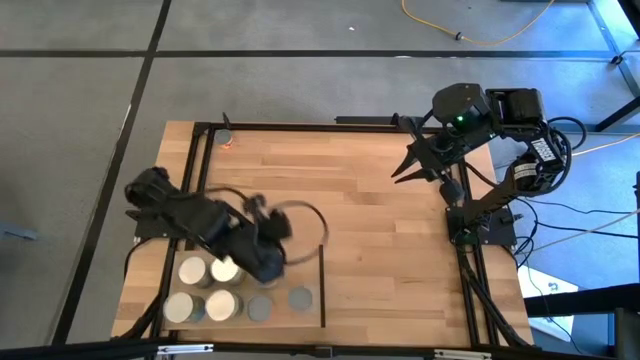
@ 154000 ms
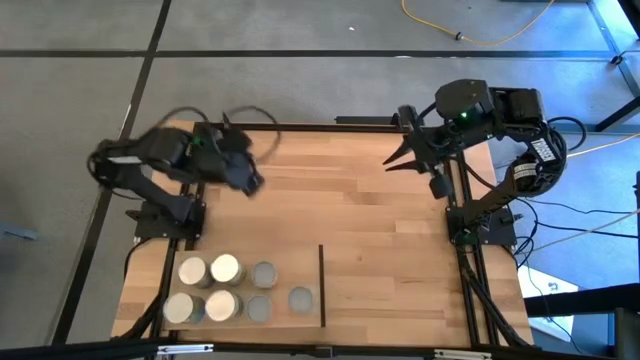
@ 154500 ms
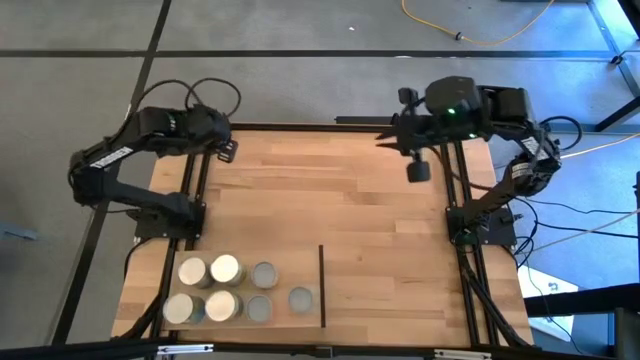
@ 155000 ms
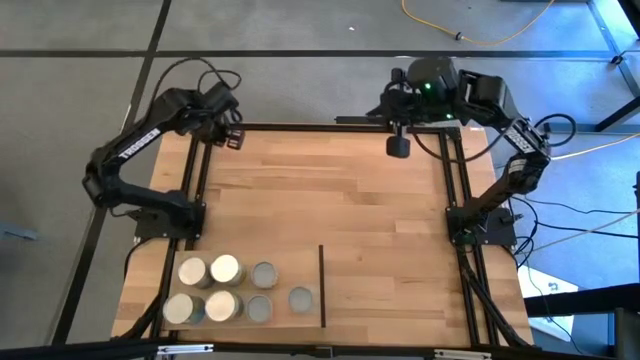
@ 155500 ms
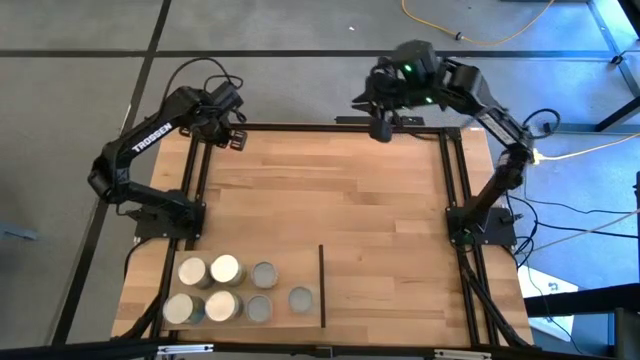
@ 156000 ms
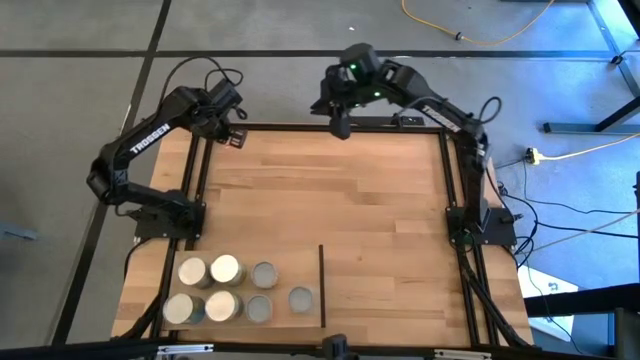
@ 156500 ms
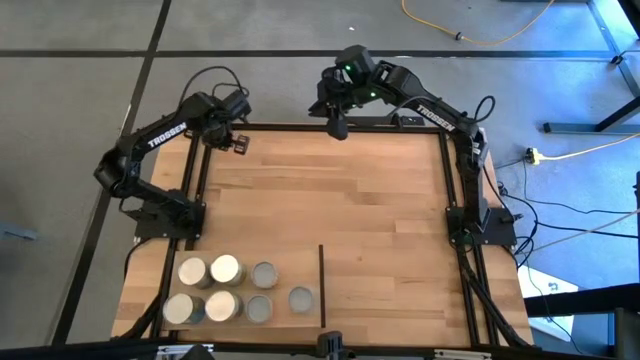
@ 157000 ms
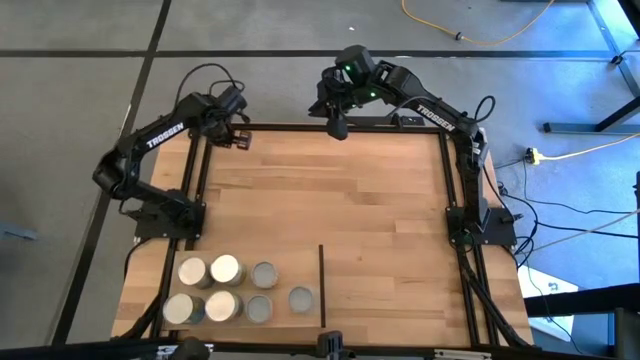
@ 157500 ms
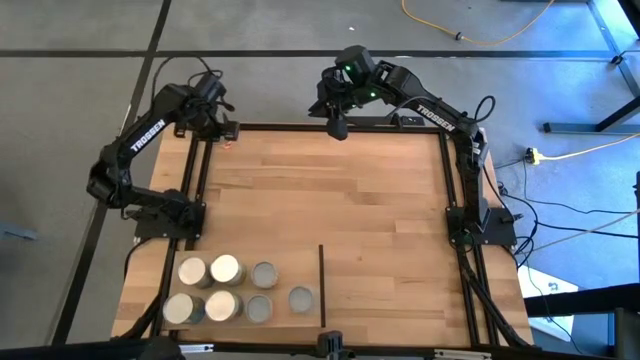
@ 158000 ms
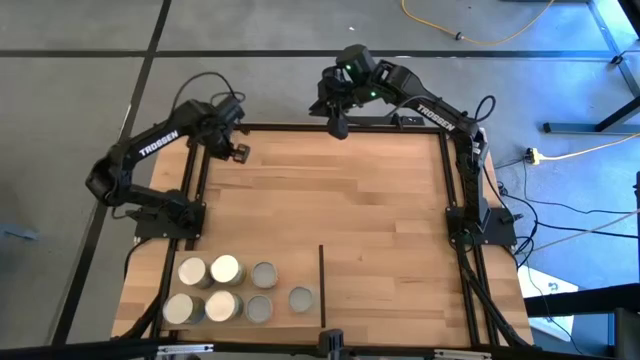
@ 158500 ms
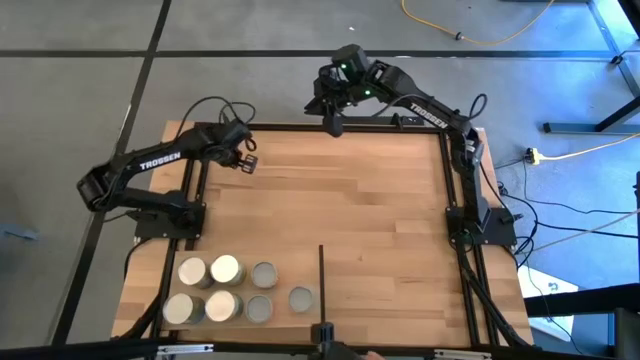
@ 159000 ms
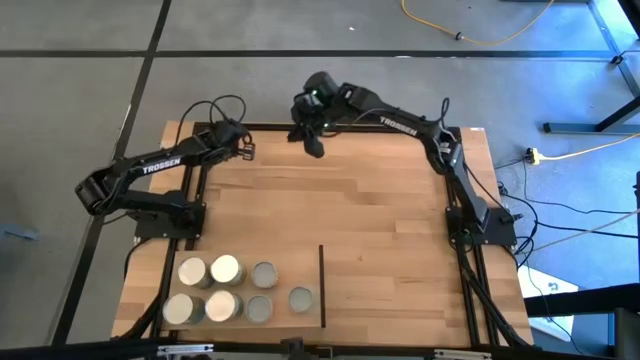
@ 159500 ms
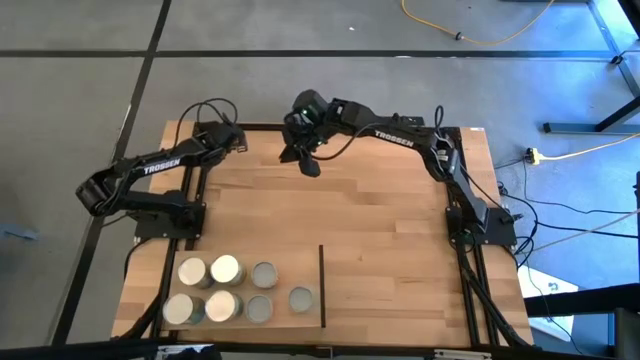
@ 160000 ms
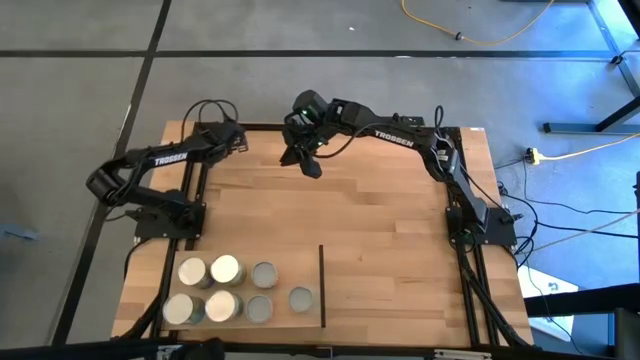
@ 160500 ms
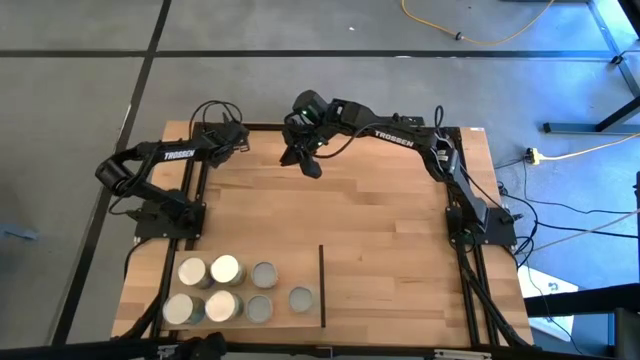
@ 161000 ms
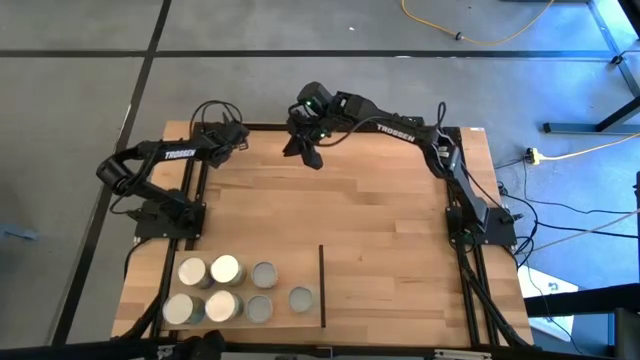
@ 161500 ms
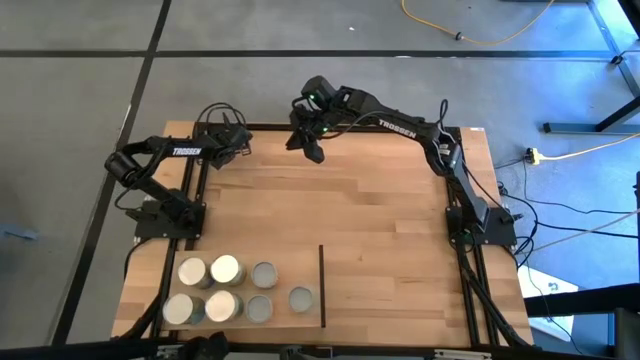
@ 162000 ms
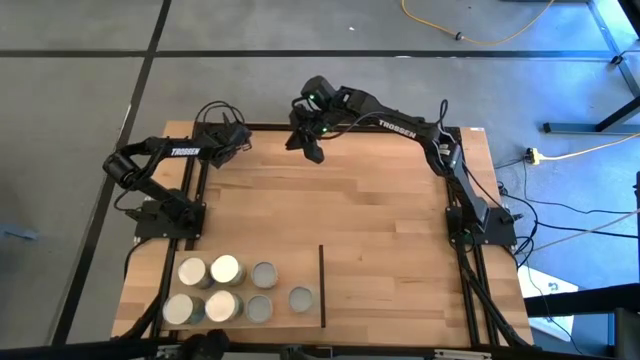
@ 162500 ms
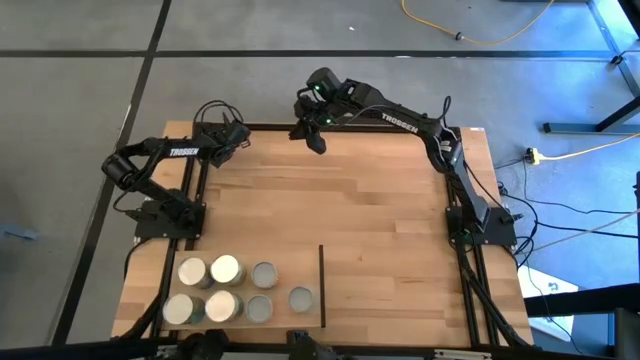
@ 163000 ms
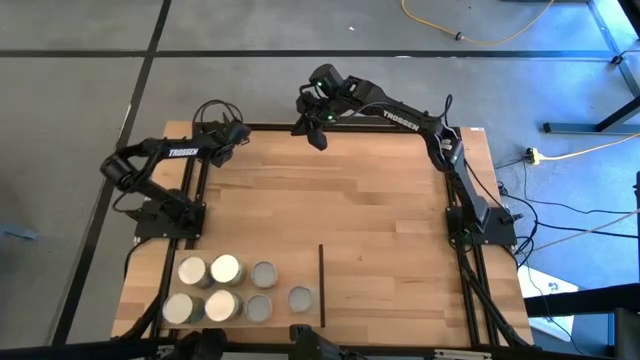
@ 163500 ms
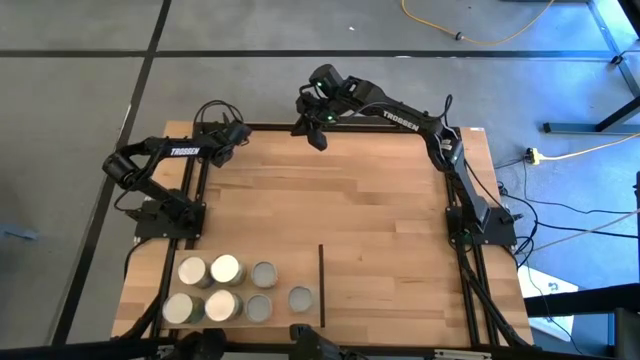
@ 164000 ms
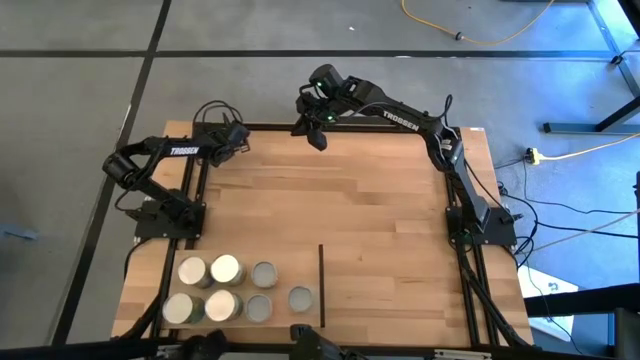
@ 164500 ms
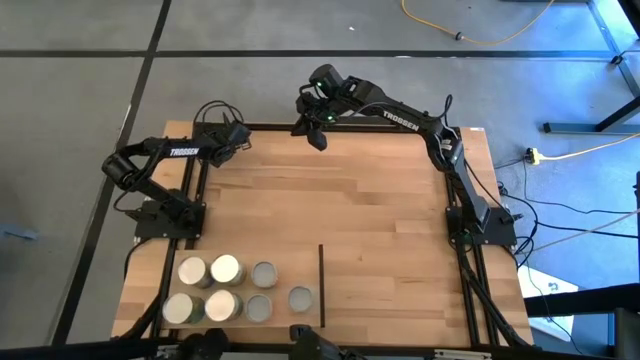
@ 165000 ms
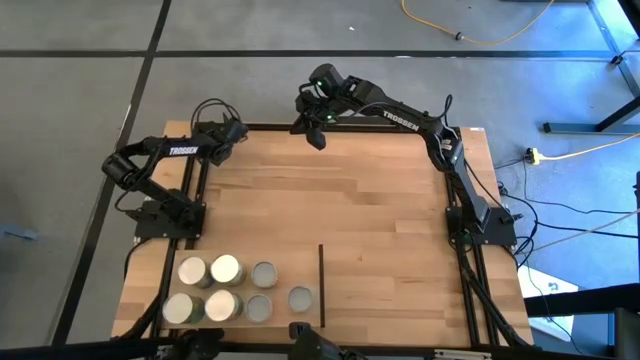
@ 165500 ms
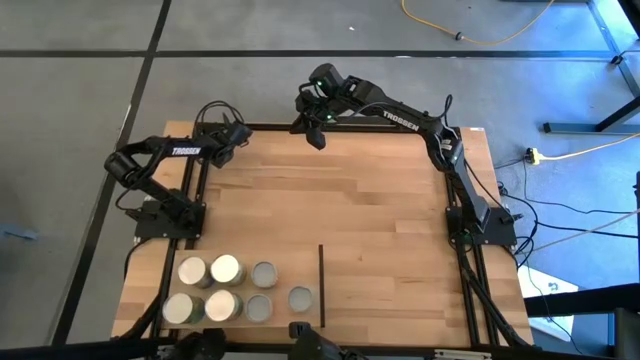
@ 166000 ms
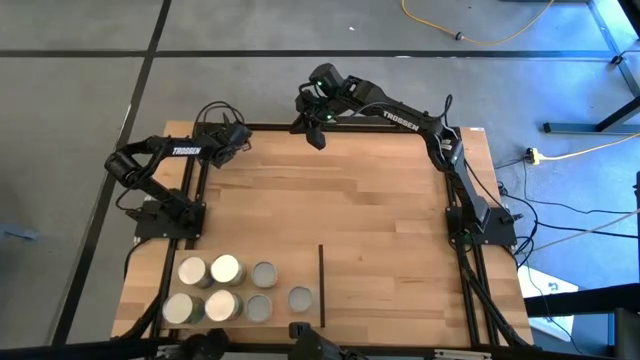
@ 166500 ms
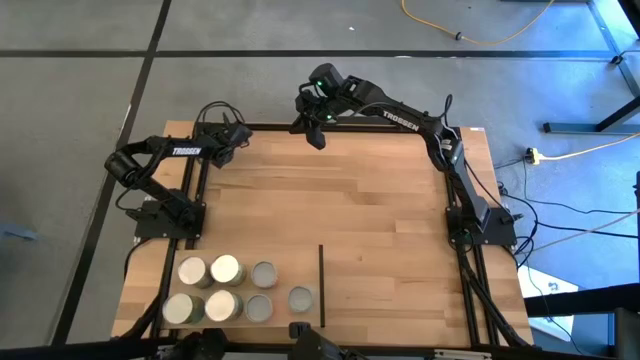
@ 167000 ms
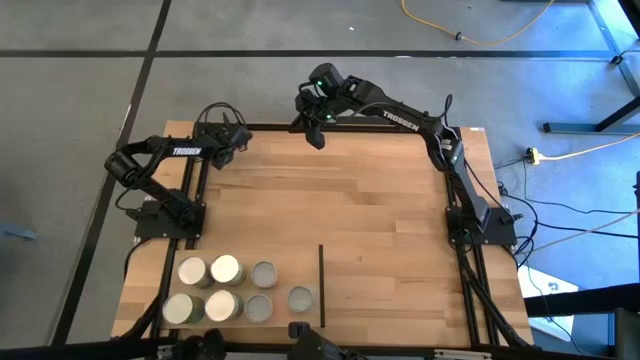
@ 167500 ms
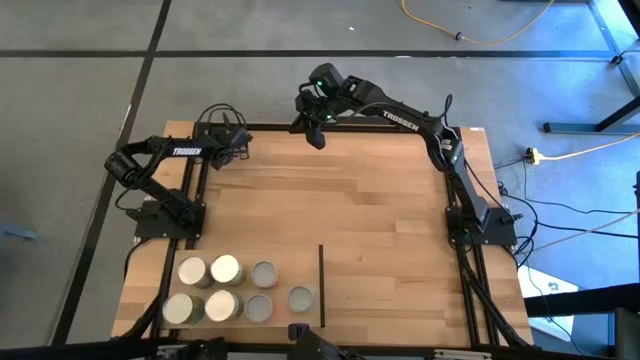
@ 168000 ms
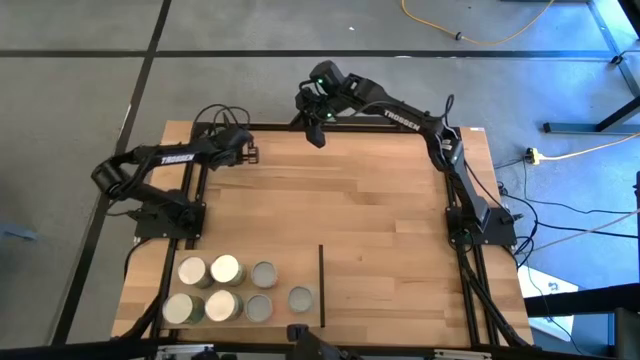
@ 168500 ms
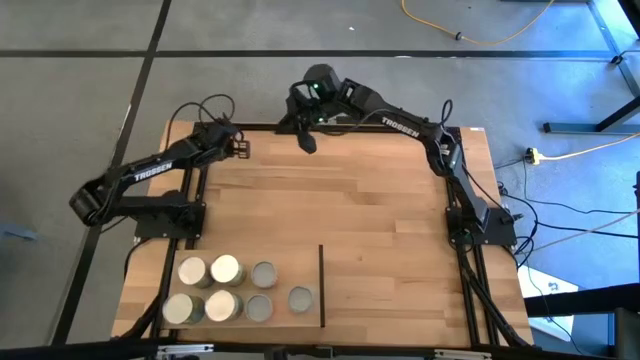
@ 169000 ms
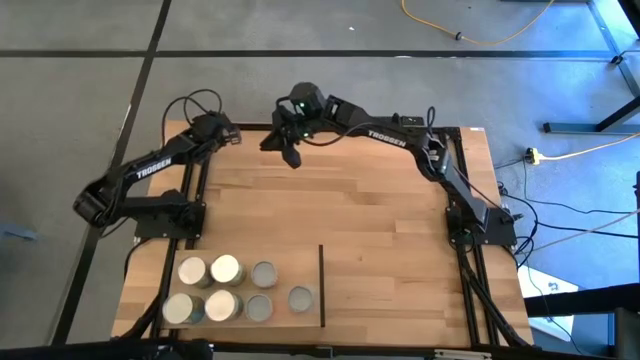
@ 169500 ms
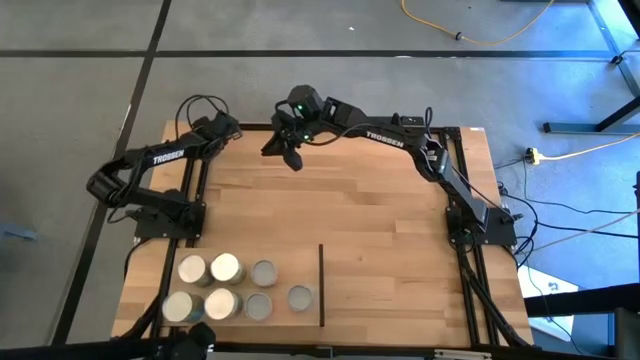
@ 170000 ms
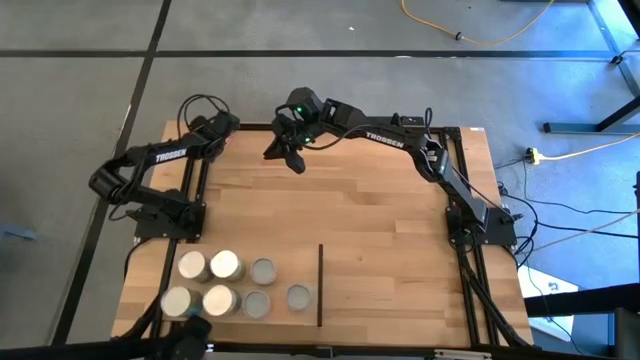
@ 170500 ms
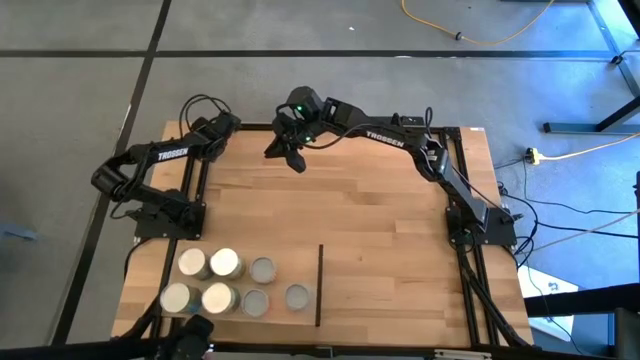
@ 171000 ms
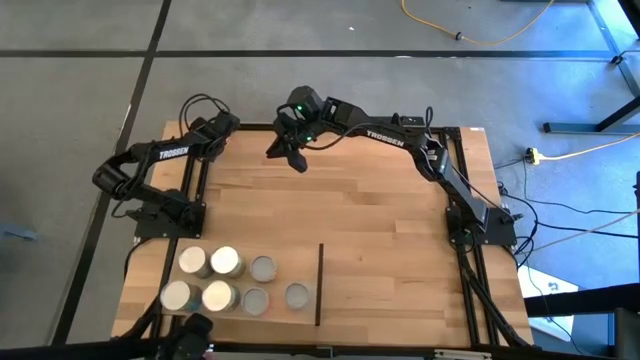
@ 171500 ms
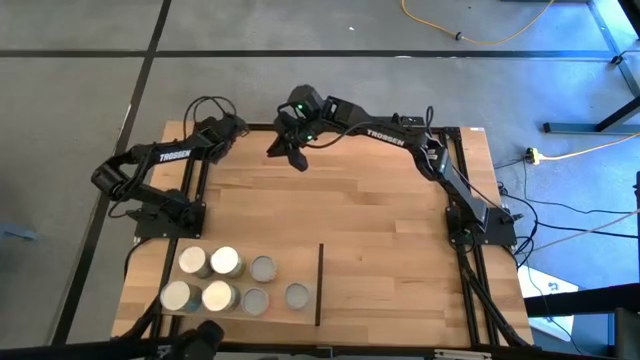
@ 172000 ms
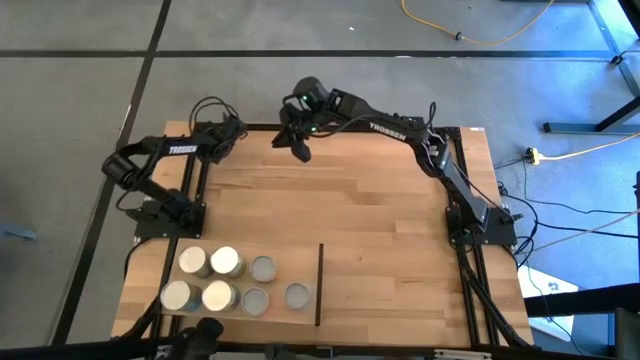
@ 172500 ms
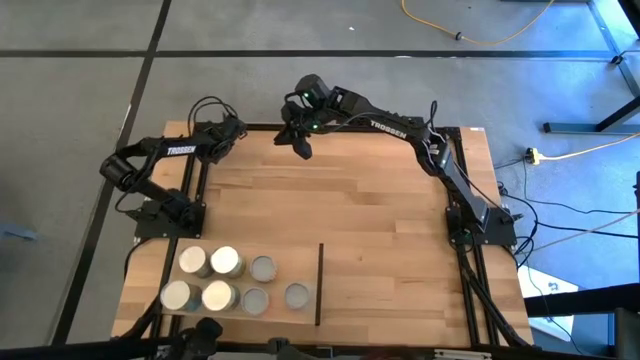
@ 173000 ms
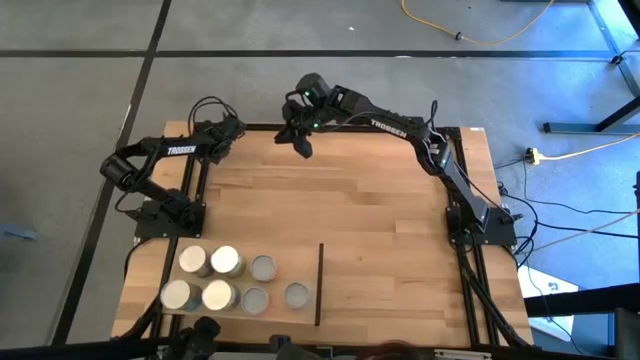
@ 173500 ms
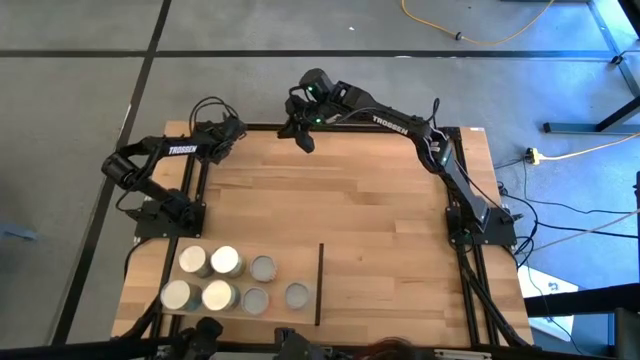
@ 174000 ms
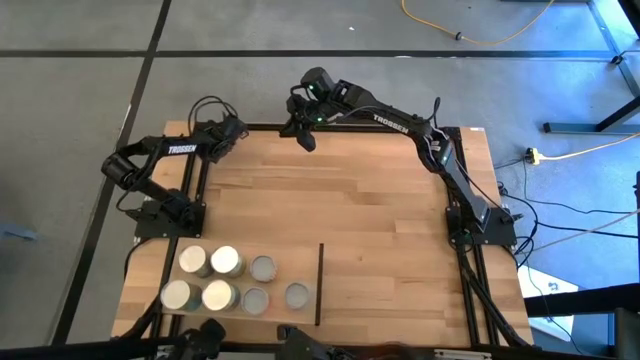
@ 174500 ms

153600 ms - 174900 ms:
Task: Pick and place cans onto a shelf
Put the canned pineapple on the shelf
